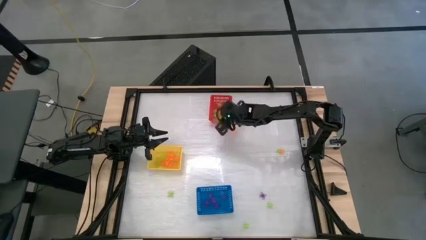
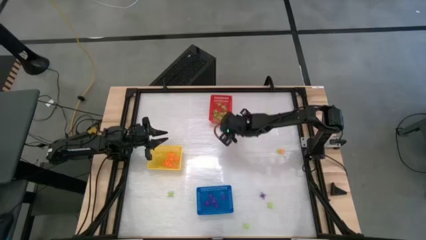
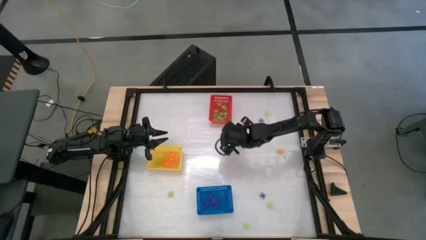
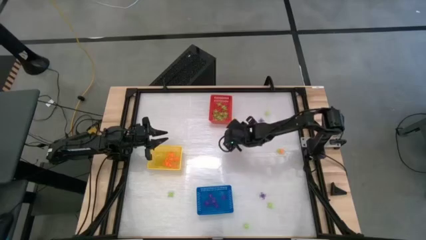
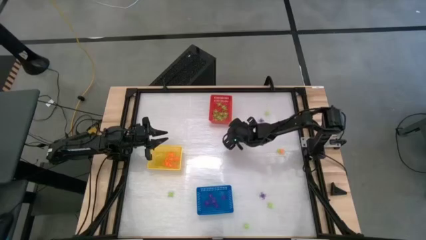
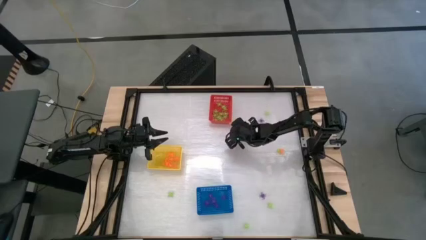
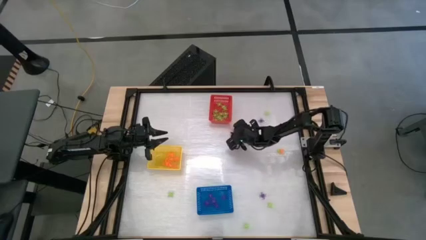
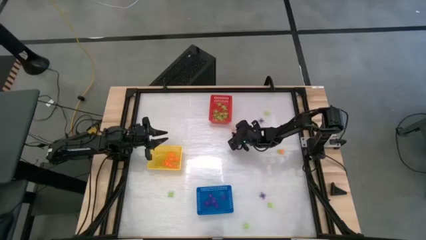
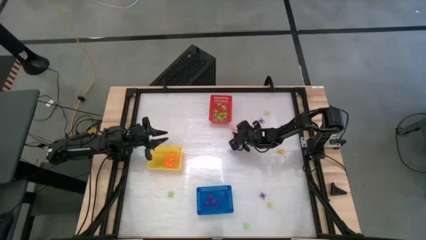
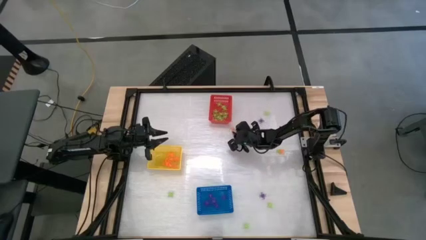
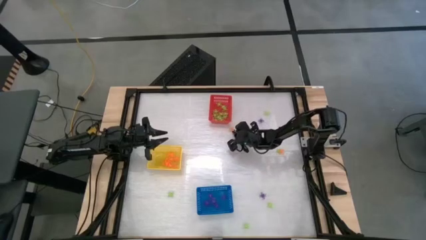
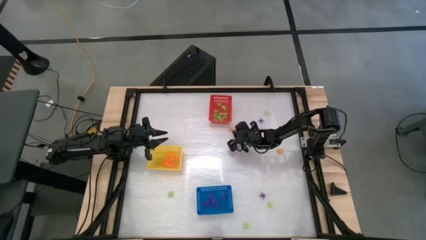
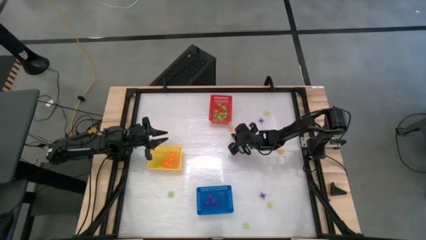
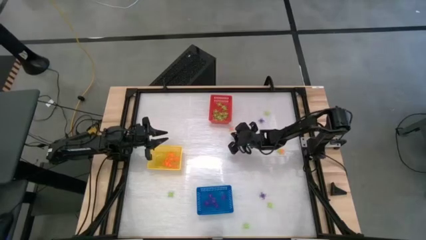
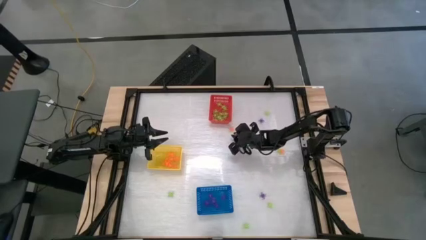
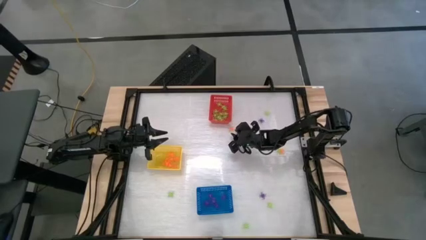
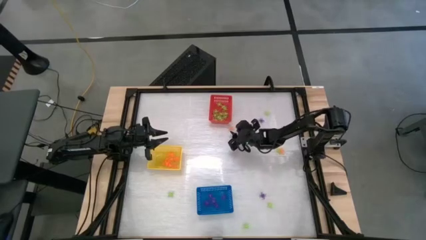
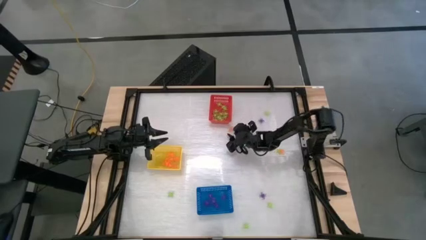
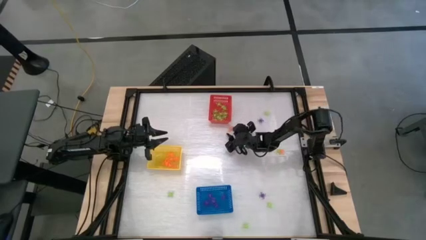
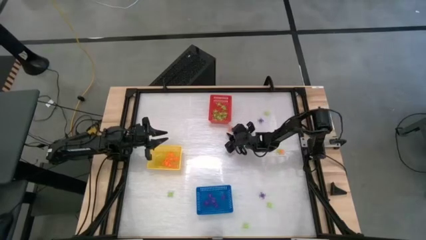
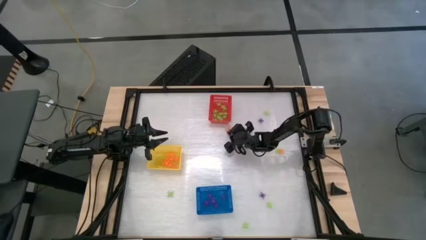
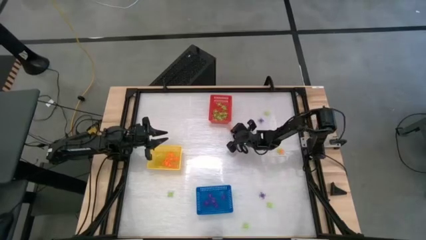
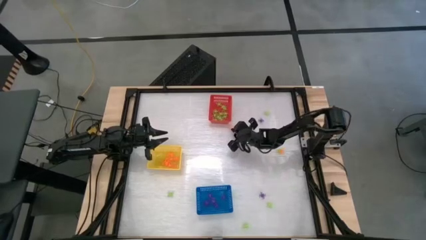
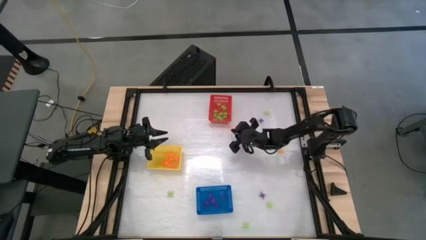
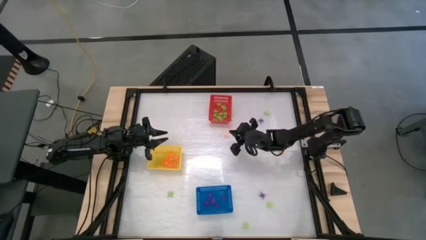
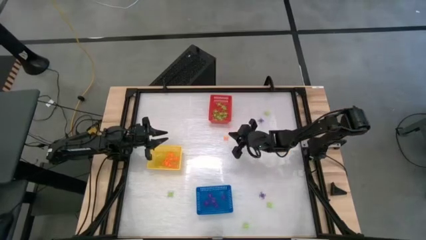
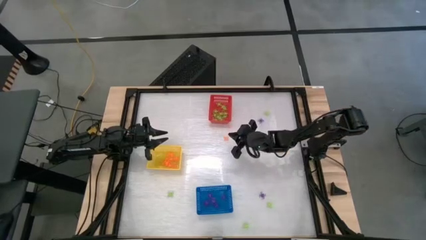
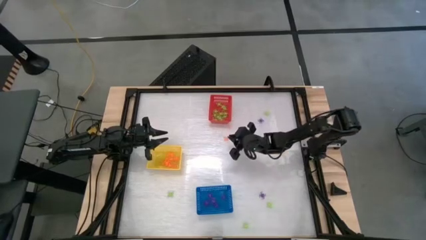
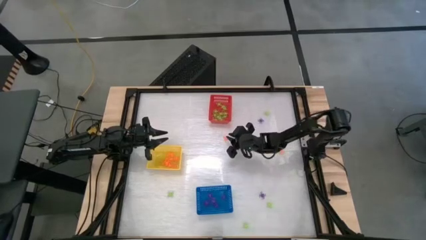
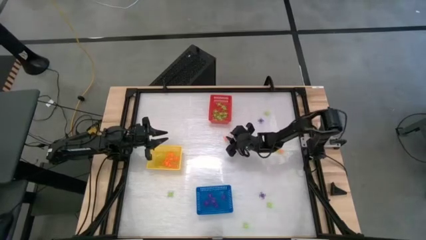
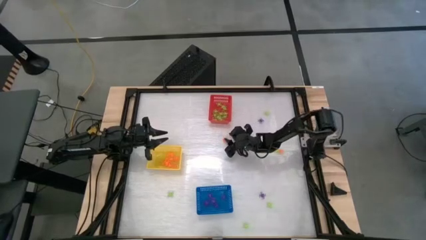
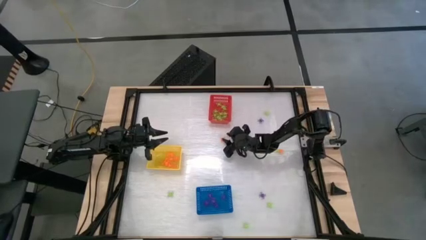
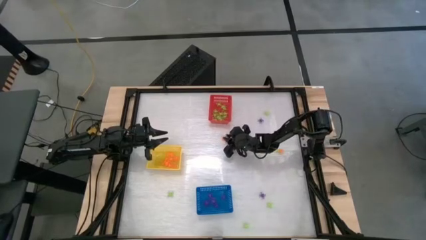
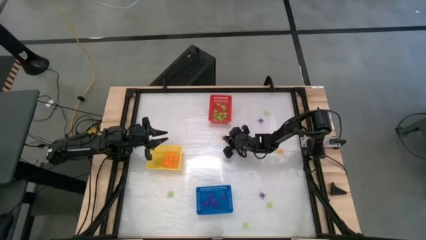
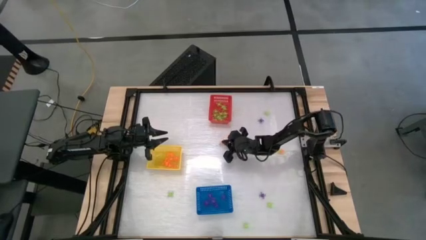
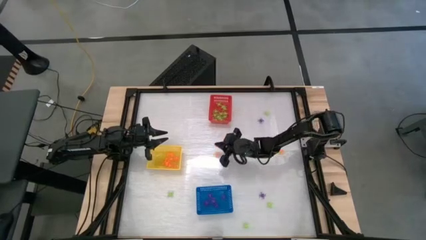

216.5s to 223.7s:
Task: Sort Halloween decoration
Put the orange spider toy into the yellow basket

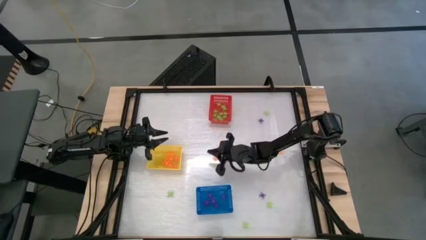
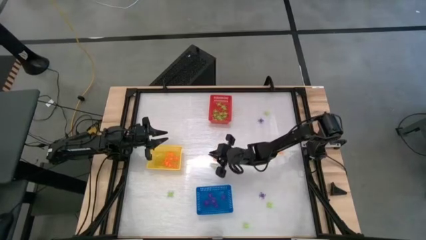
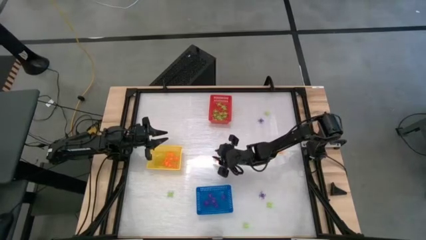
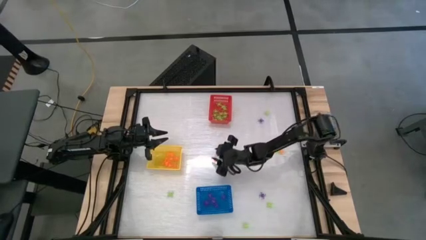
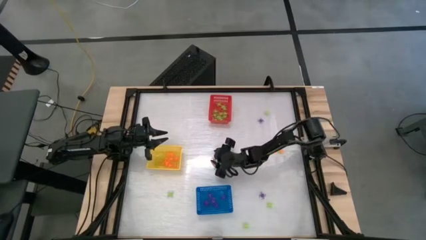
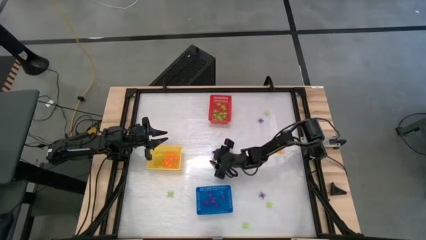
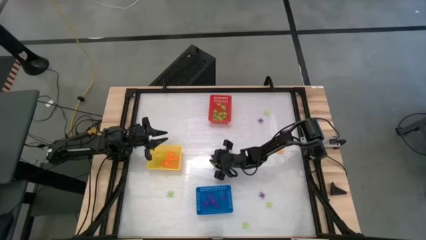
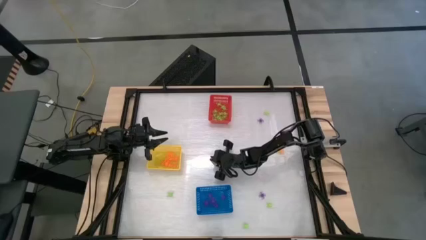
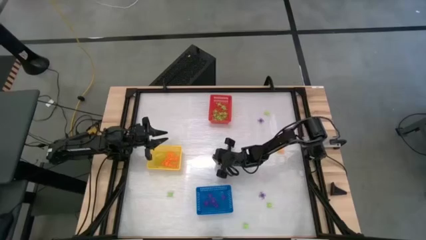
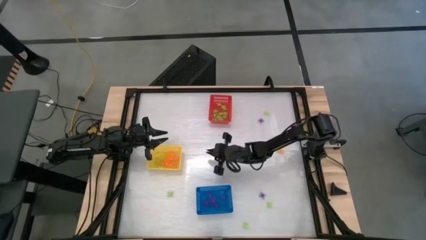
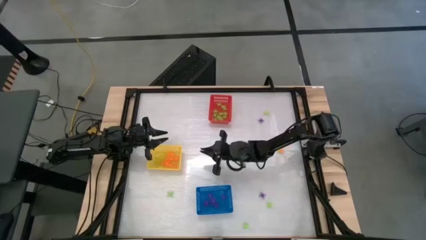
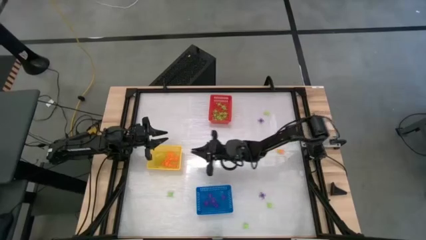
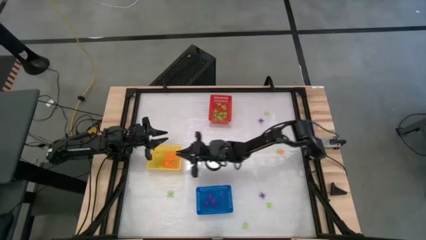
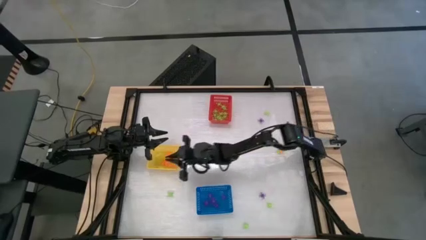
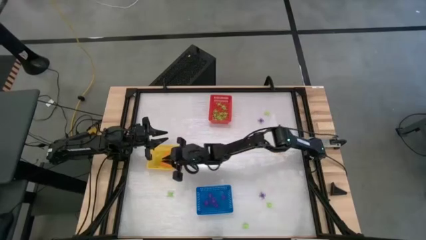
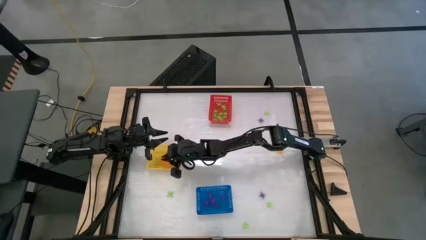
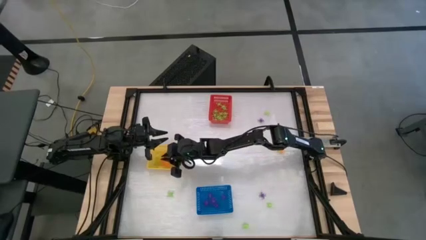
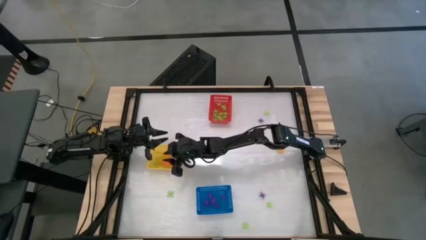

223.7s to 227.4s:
Put the orange spider toy into the yellow basket

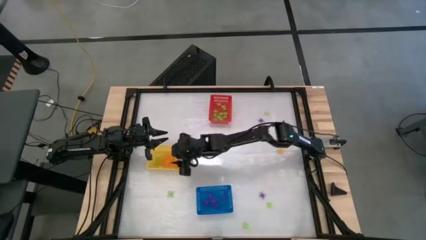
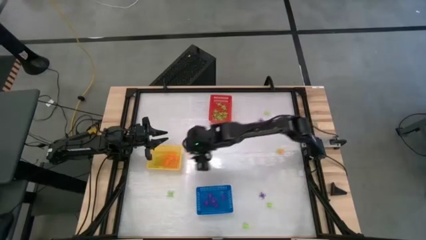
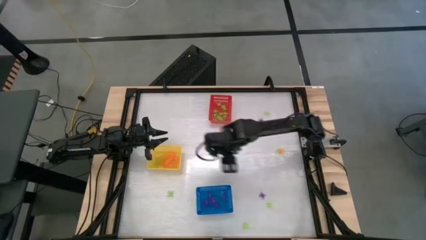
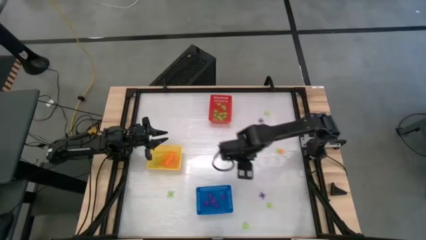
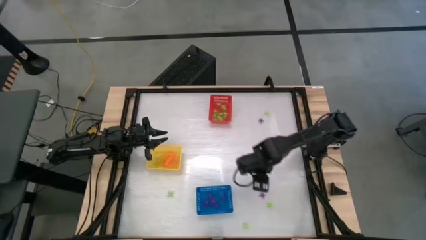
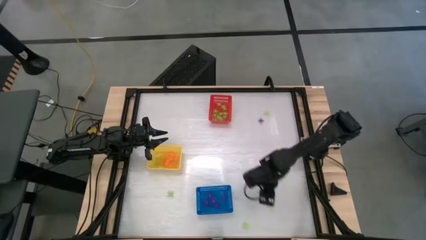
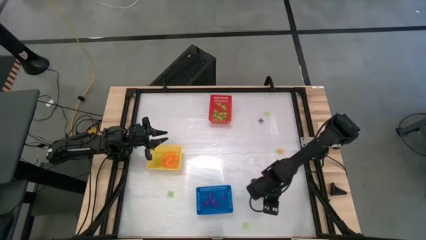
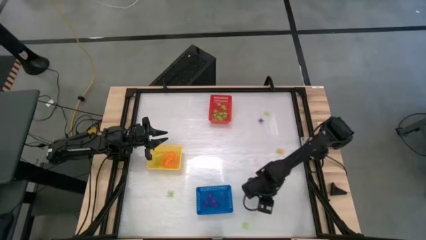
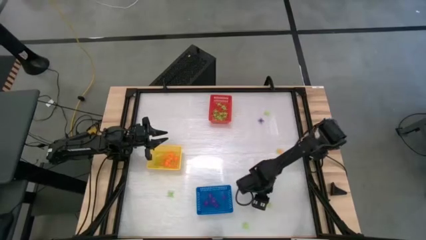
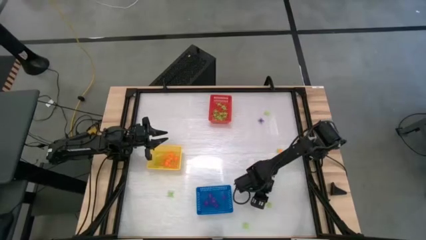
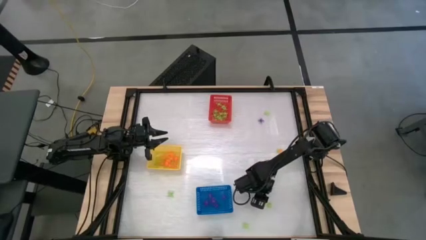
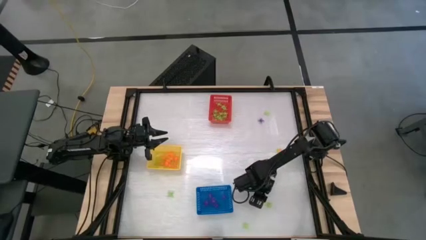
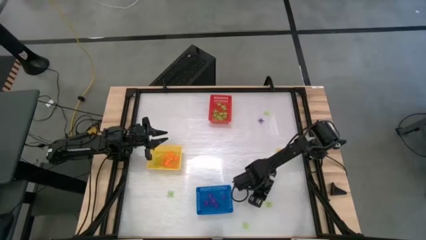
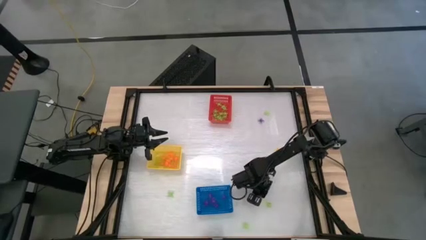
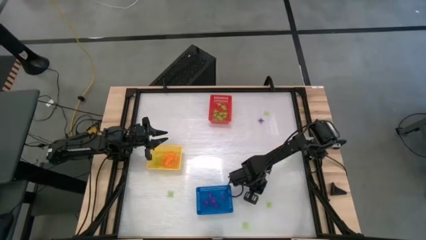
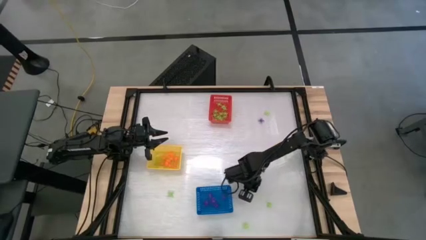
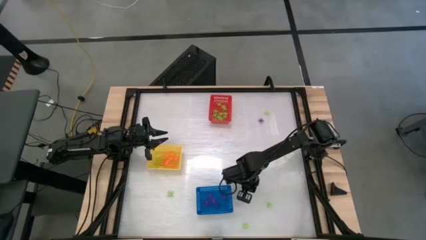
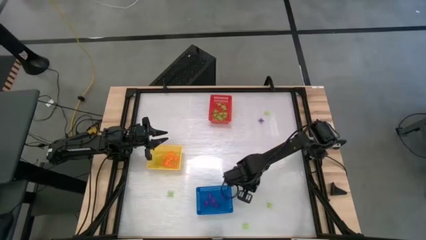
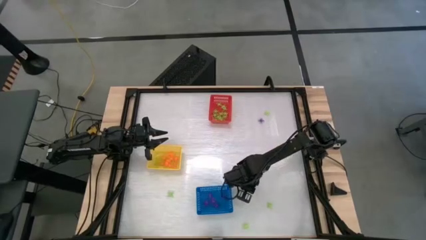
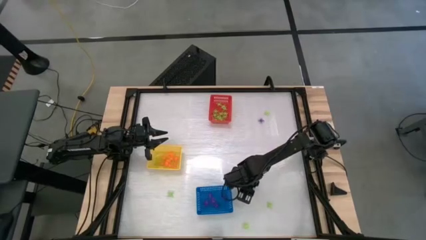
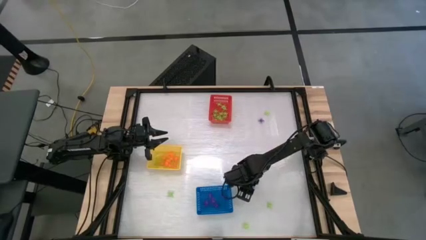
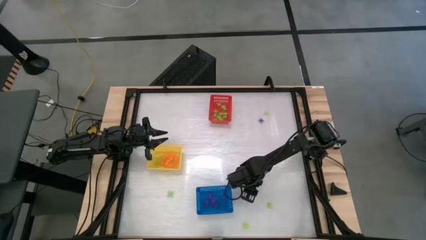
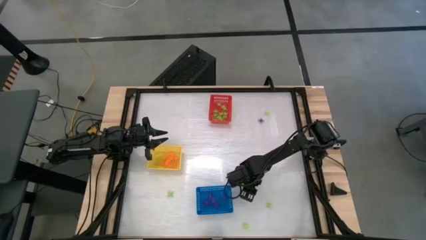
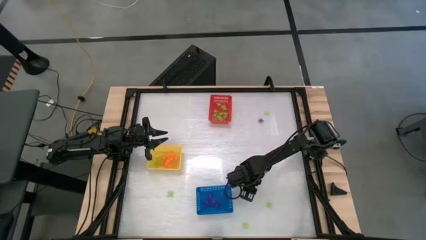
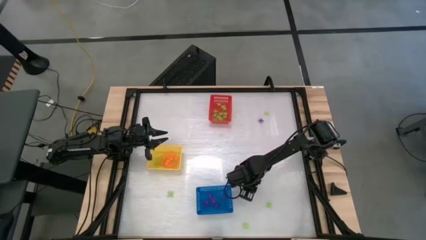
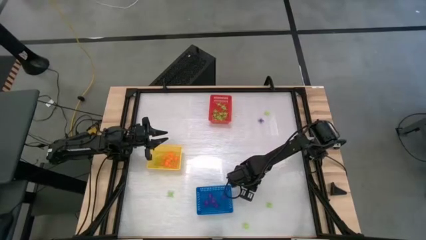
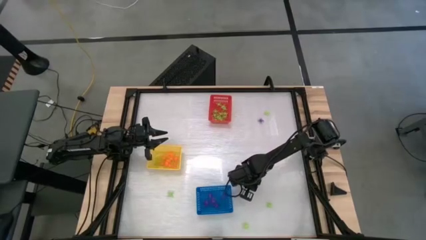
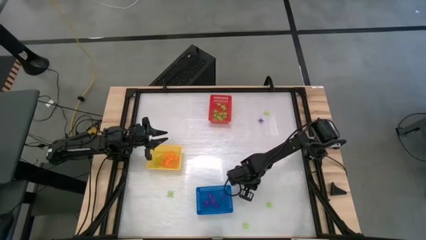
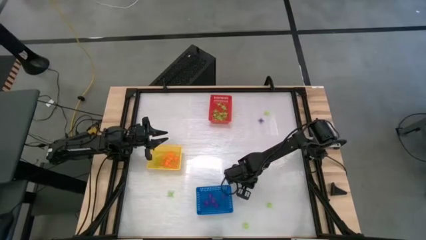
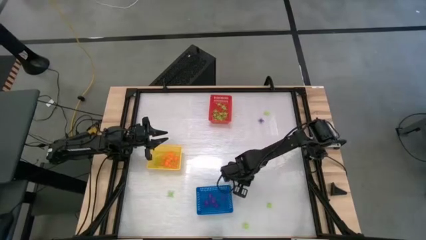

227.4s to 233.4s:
Put the purple spider toy into the blue basket
